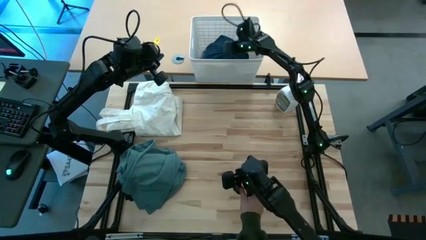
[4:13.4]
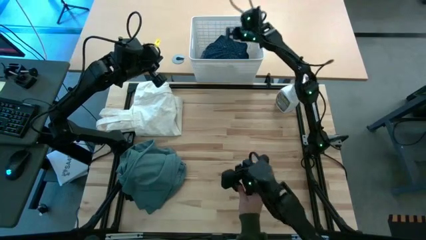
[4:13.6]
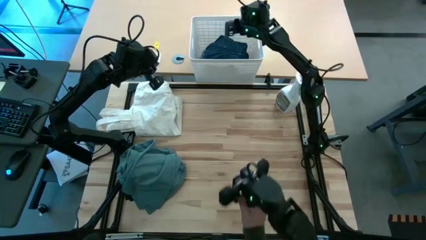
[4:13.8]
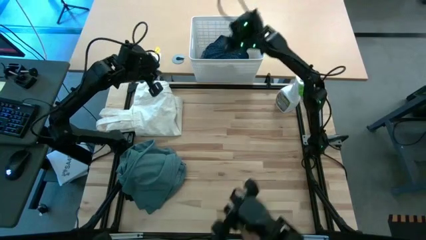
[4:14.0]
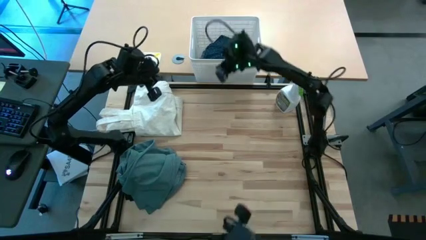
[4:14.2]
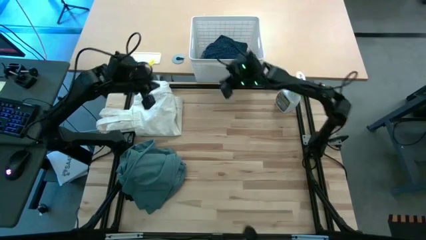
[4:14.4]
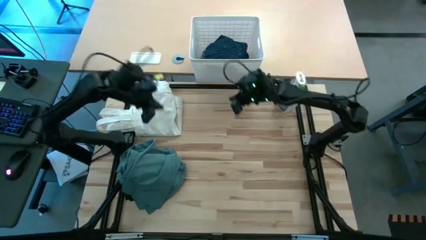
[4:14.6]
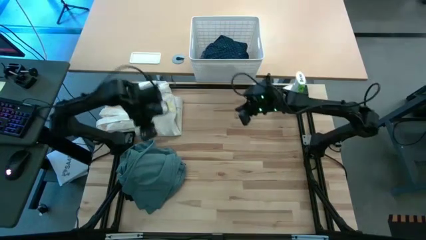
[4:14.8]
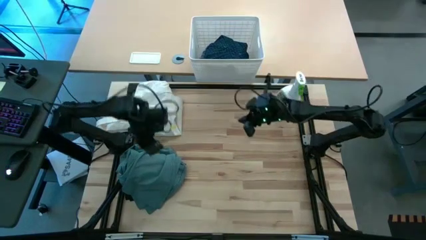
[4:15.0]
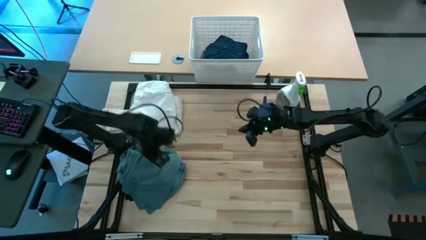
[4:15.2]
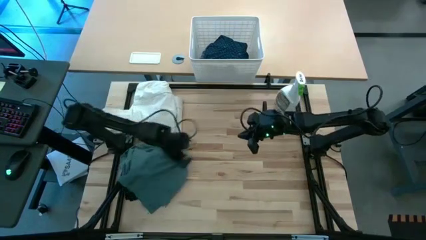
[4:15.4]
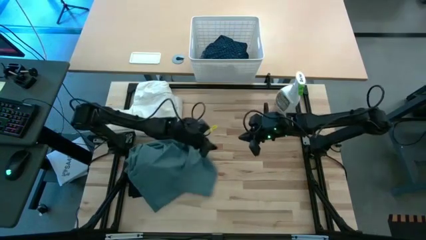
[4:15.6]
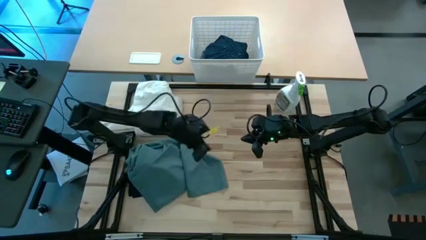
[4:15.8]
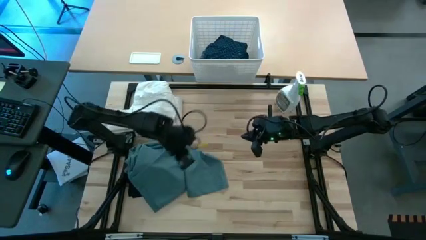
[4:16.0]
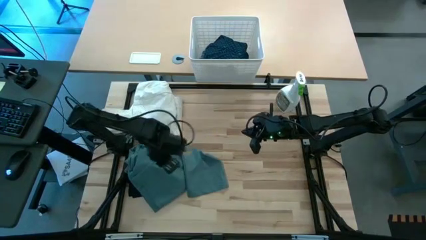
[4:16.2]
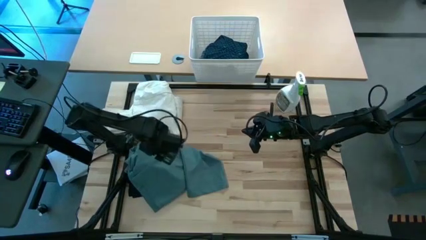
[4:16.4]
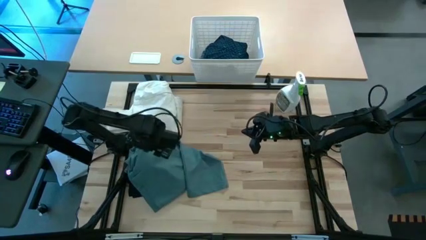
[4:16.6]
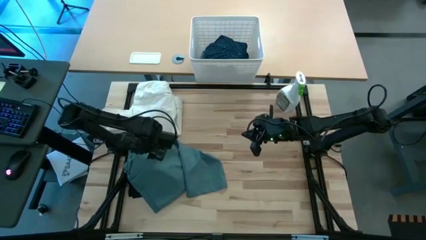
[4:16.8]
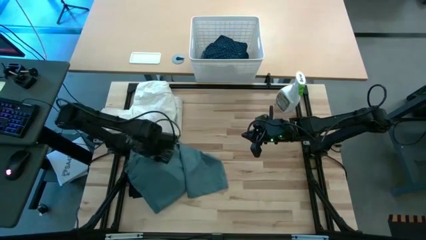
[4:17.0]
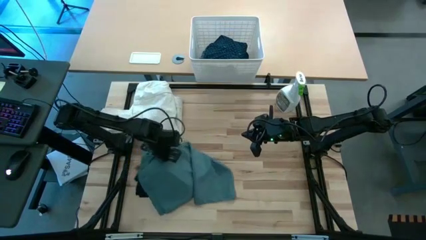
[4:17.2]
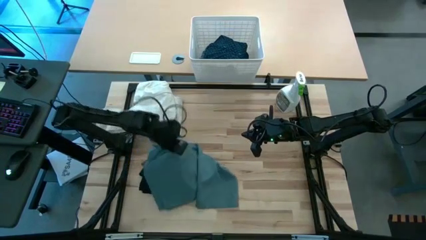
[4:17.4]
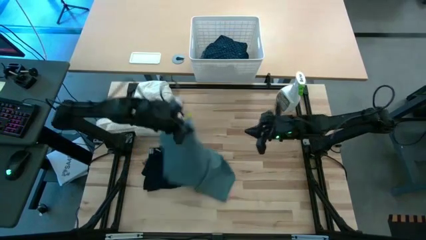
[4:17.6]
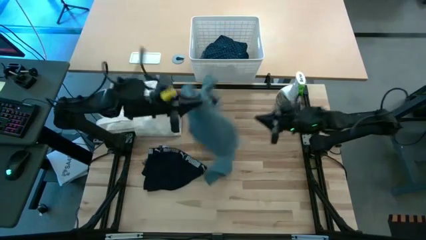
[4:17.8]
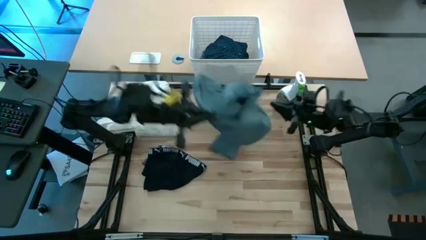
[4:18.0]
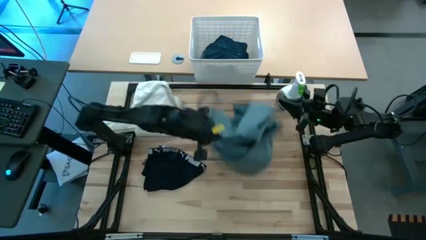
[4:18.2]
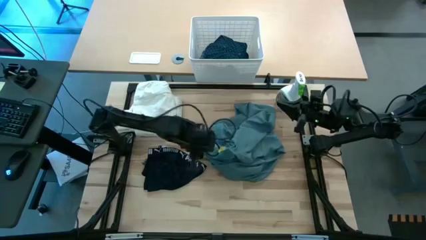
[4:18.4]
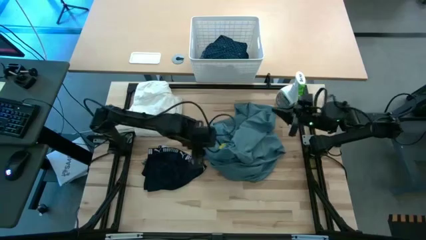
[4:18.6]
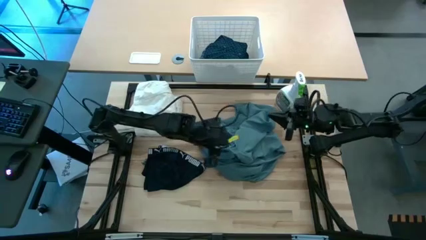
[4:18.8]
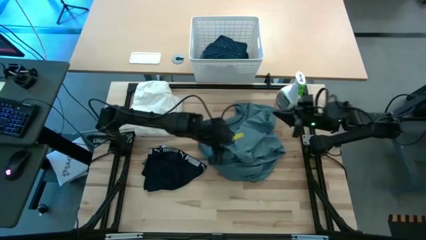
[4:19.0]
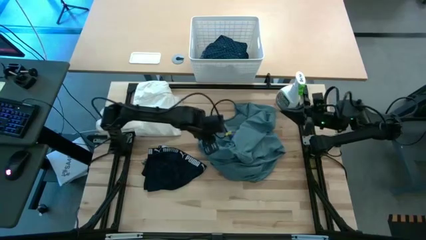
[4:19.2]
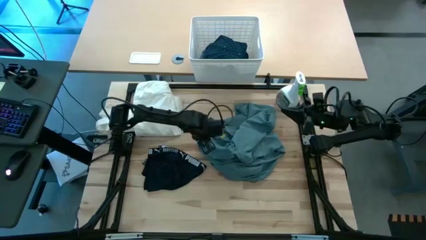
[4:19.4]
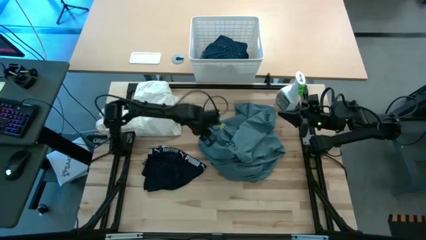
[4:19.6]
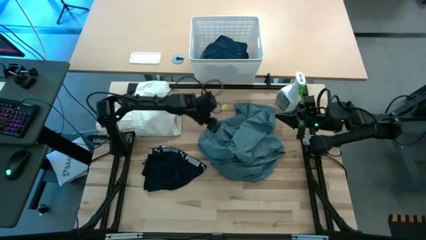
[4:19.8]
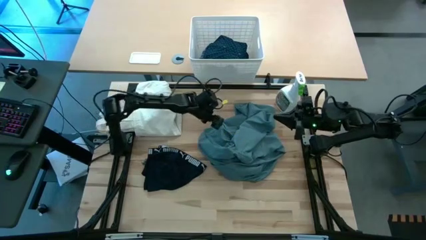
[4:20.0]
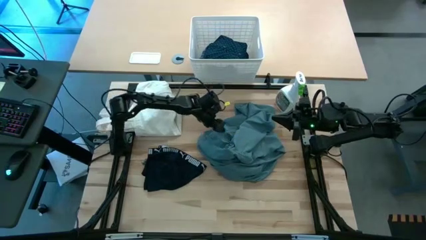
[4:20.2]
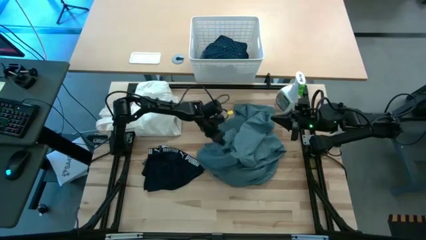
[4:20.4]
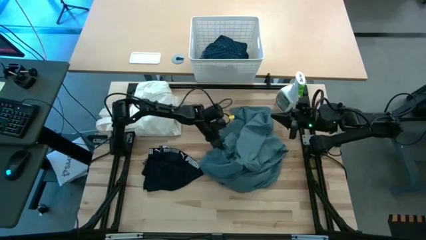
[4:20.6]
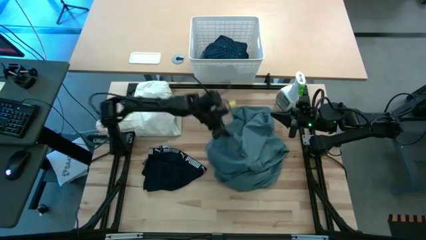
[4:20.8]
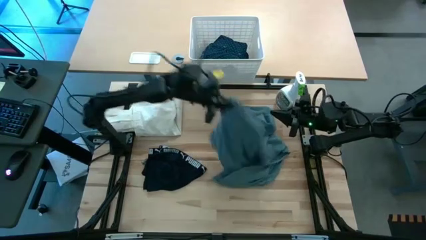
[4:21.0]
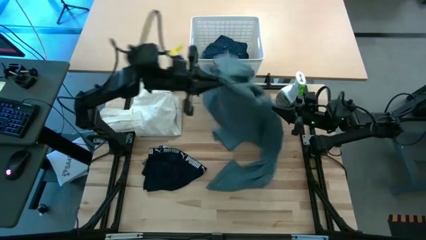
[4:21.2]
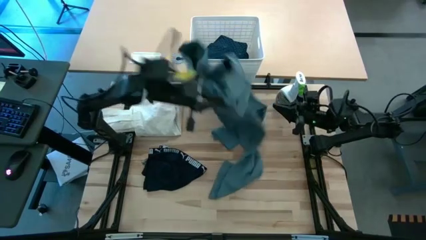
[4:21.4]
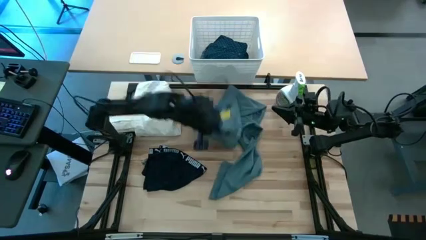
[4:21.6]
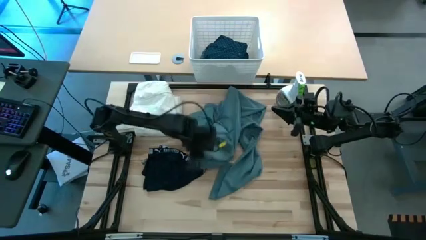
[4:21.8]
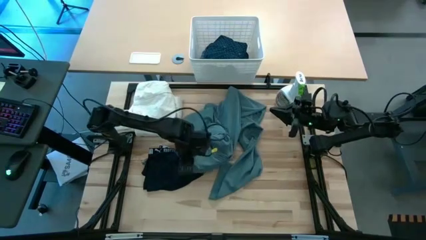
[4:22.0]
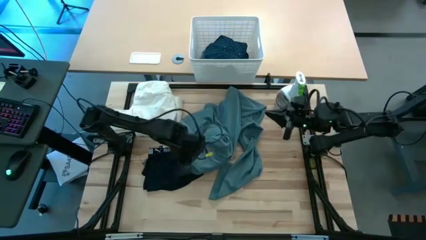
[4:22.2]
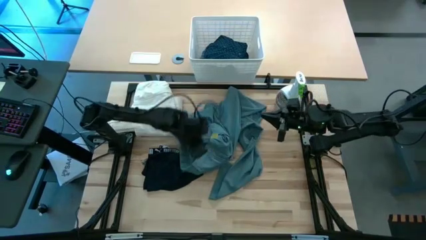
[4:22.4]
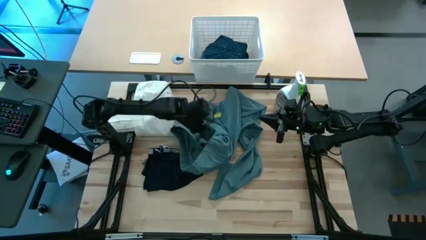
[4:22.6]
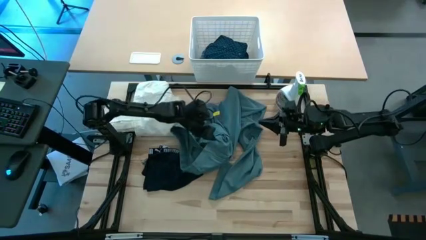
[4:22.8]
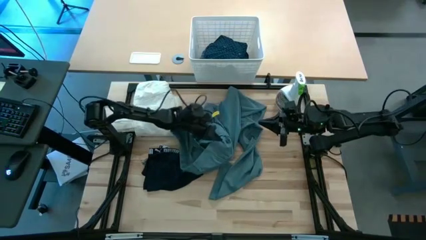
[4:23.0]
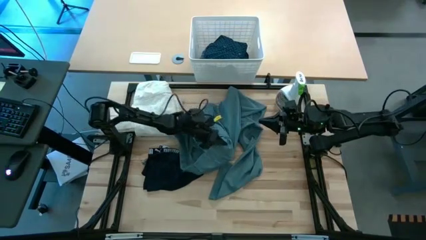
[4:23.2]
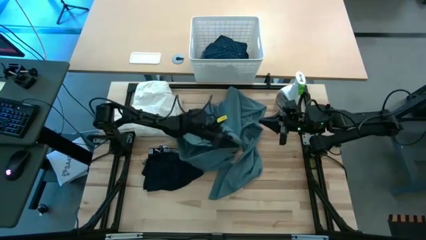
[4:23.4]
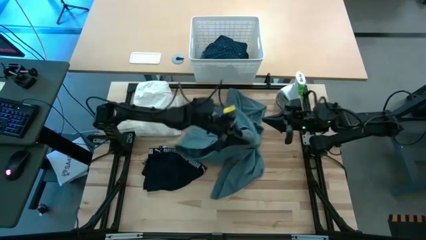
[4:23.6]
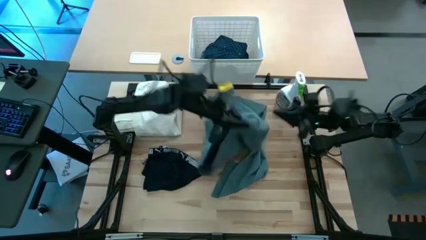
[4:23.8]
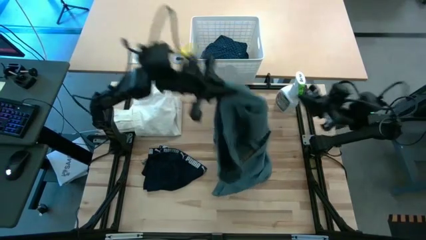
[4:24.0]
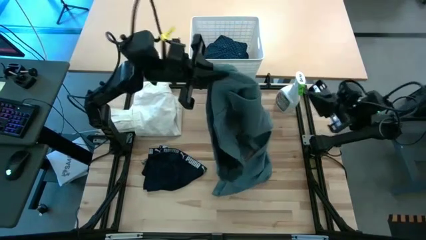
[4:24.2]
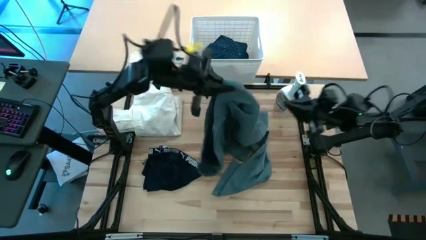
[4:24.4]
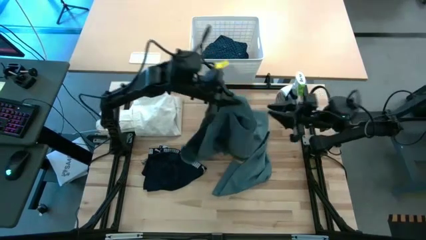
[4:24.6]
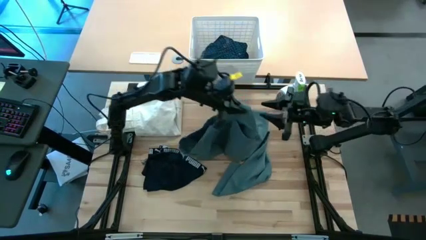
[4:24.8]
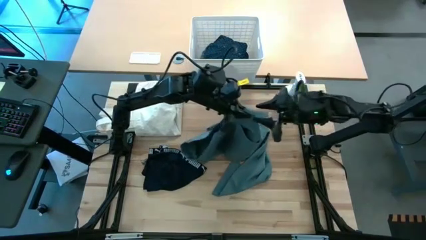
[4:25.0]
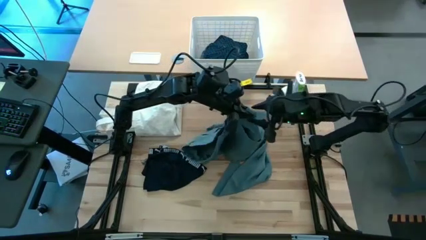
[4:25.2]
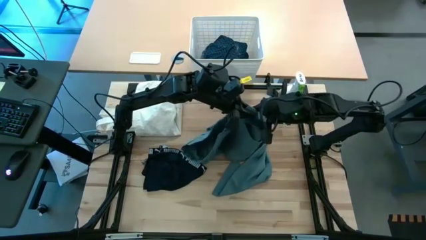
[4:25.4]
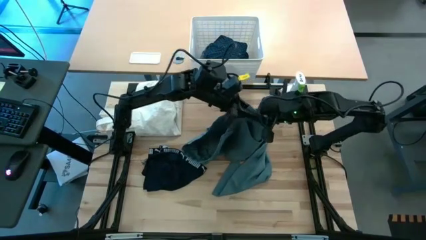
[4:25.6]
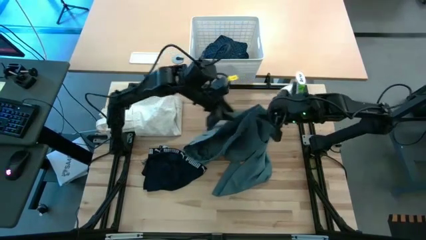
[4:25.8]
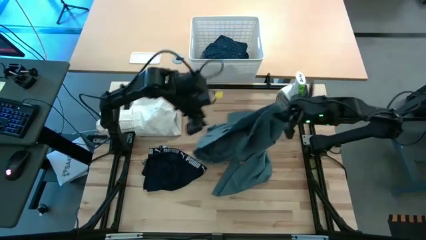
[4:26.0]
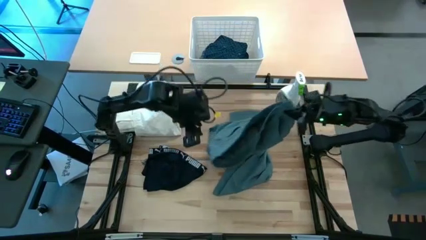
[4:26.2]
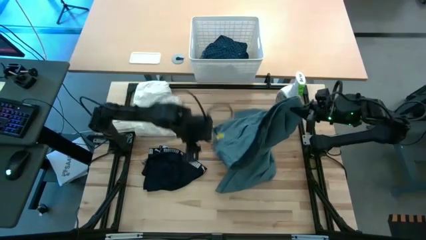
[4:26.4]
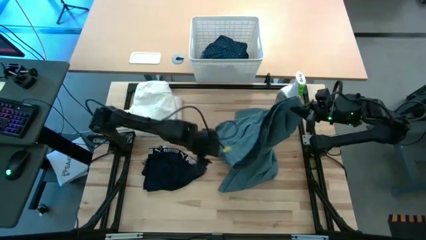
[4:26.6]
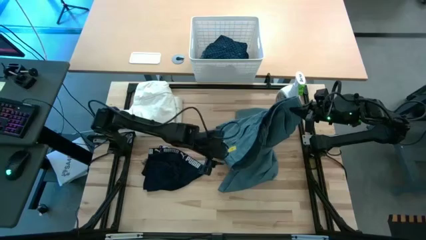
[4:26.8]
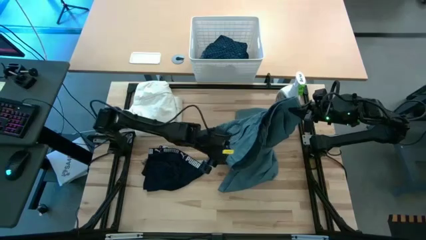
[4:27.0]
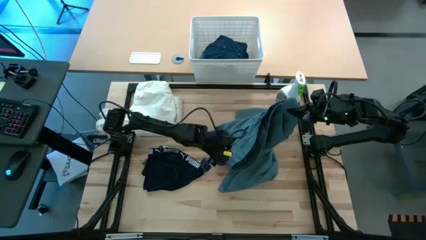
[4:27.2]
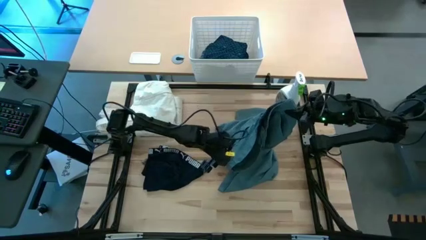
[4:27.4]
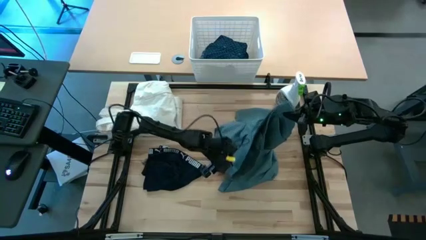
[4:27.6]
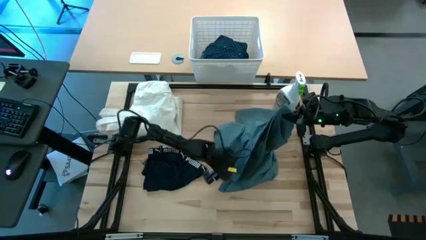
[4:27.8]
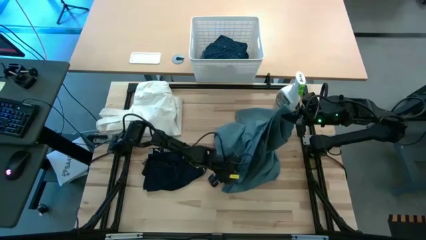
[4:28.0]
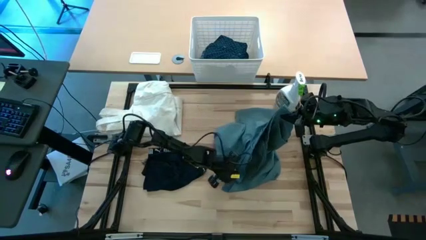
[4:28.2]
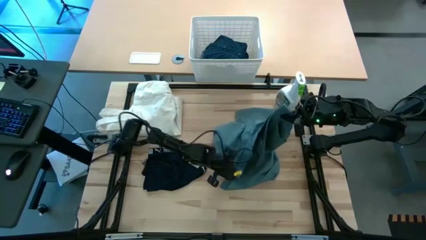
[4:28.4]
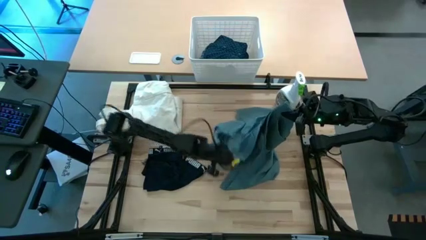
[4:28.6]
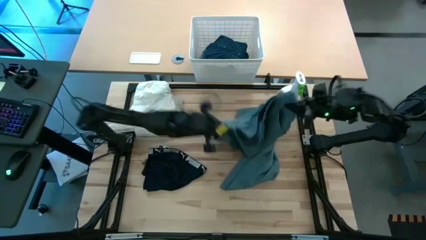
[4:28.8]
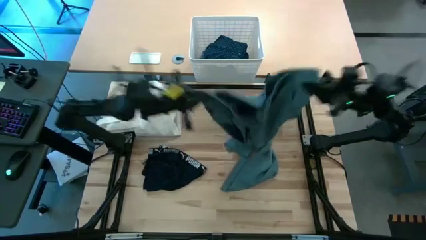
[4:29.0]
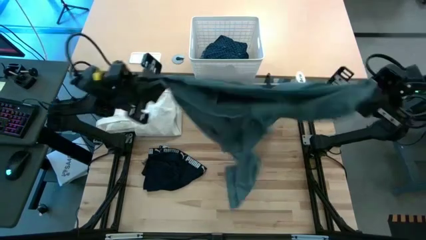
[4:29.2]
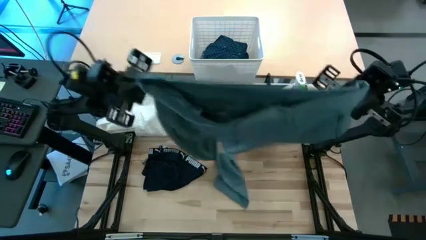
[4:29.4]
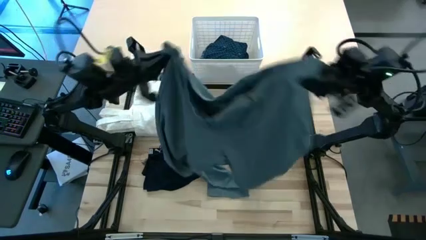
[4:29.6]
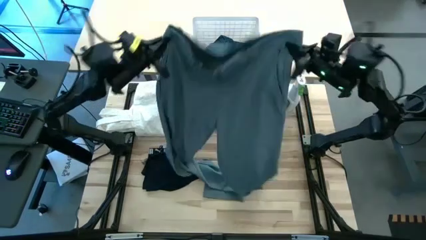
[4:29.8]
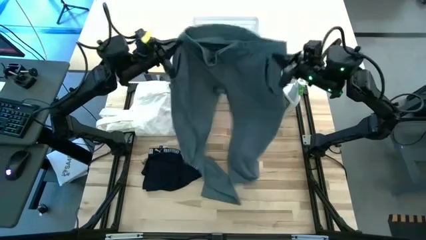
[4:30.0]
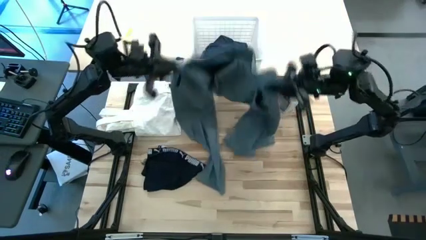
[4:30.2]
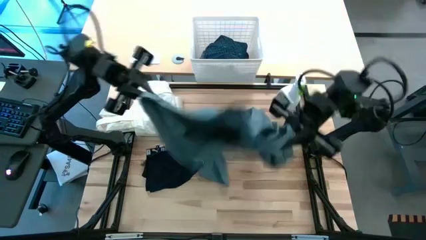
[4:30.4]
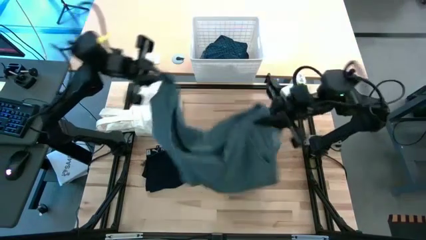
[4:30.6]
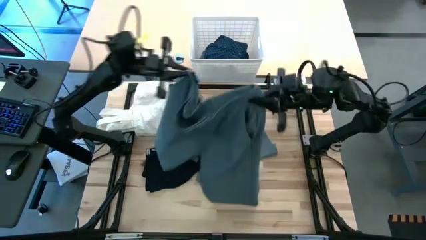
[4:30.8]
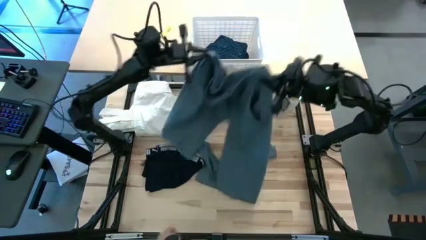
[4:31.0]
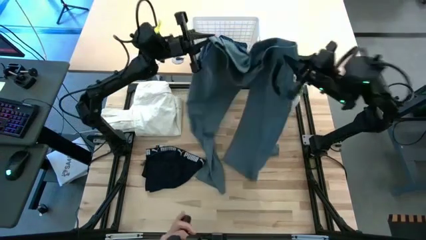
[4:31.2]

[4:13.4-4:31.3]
Fold the green pants
